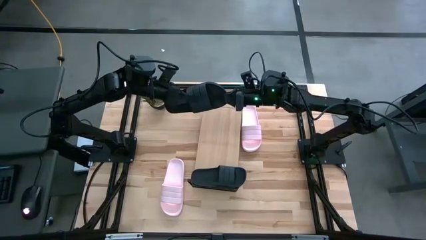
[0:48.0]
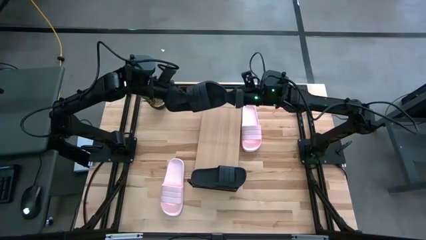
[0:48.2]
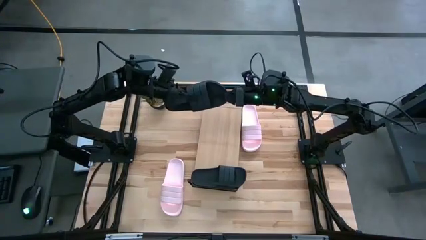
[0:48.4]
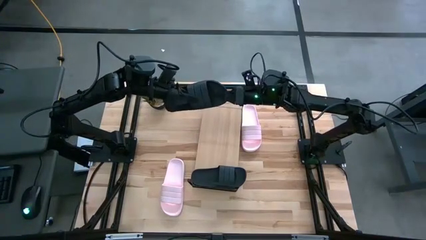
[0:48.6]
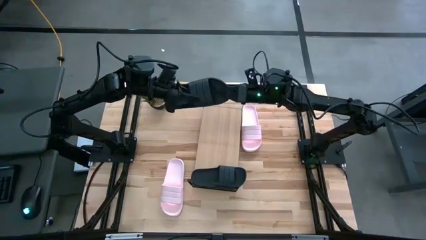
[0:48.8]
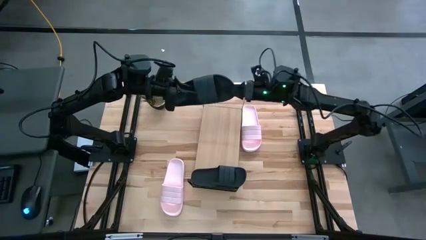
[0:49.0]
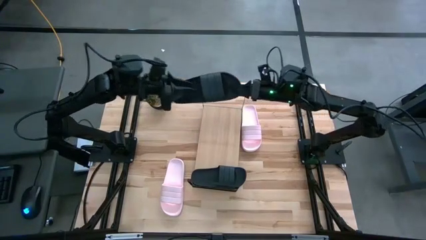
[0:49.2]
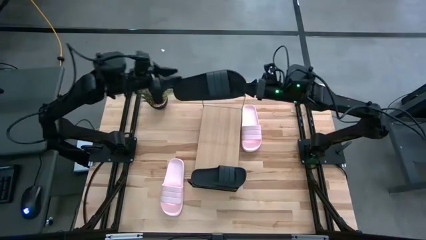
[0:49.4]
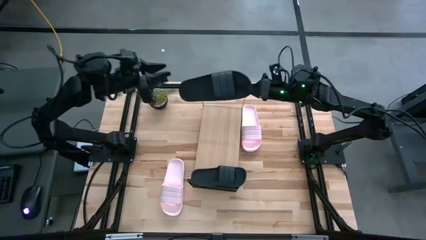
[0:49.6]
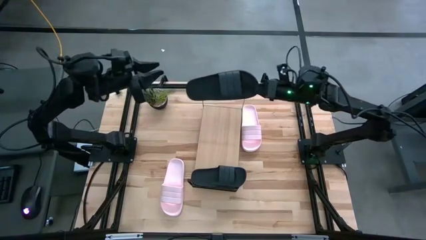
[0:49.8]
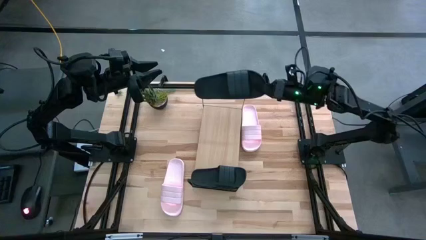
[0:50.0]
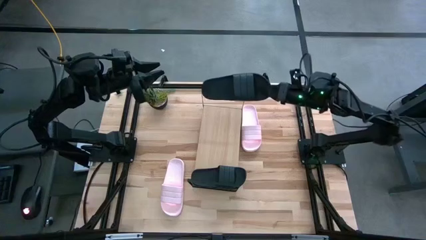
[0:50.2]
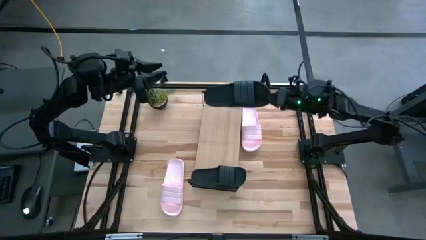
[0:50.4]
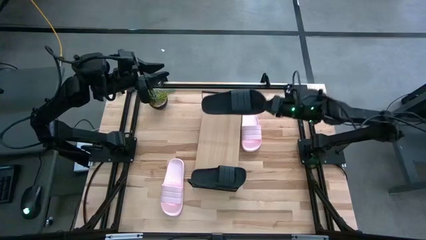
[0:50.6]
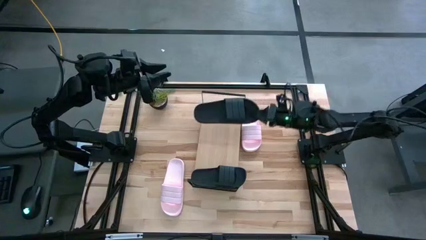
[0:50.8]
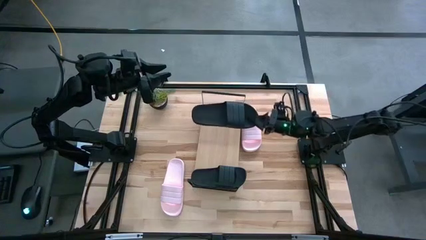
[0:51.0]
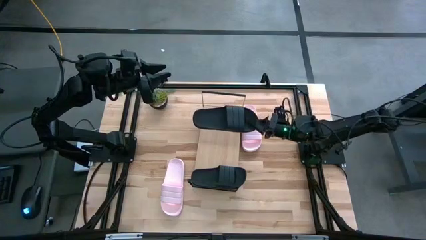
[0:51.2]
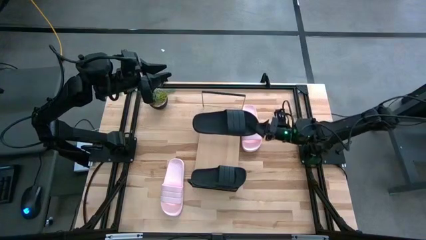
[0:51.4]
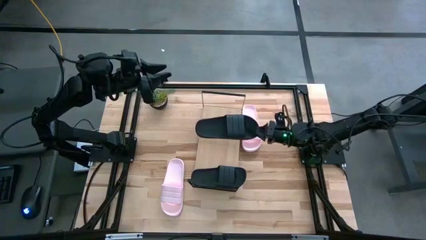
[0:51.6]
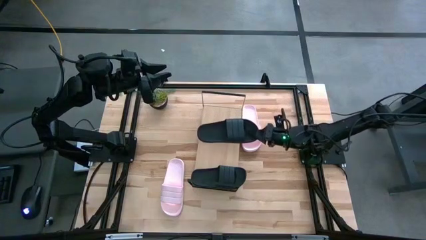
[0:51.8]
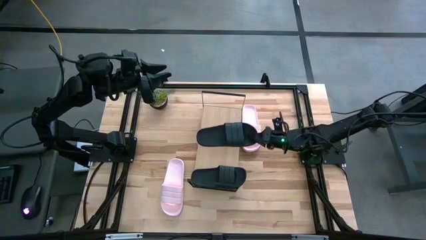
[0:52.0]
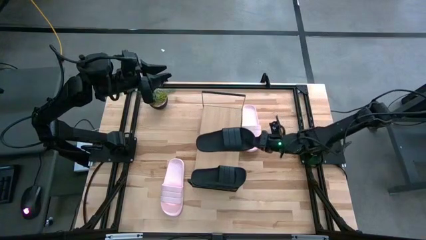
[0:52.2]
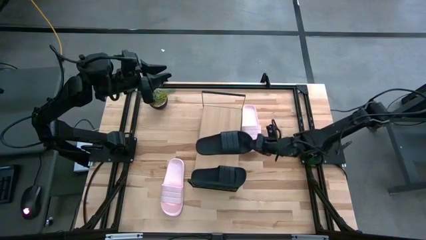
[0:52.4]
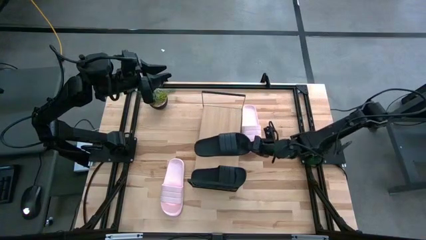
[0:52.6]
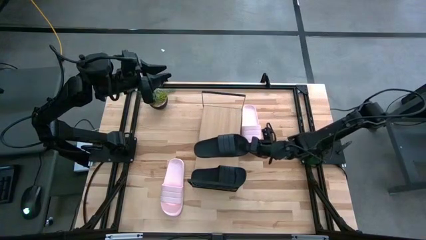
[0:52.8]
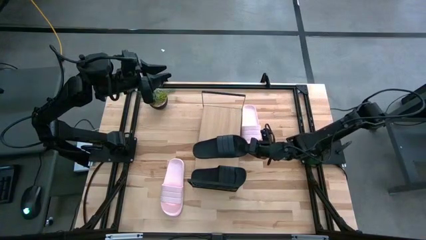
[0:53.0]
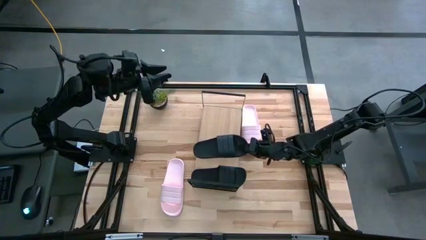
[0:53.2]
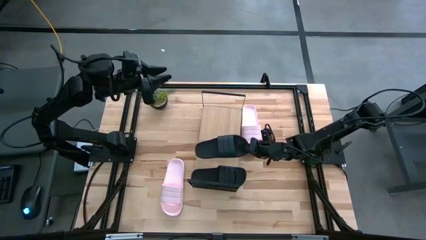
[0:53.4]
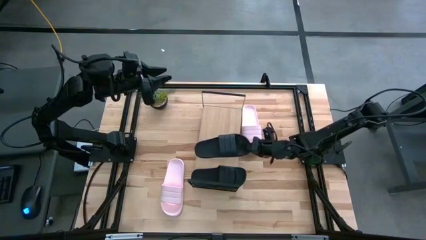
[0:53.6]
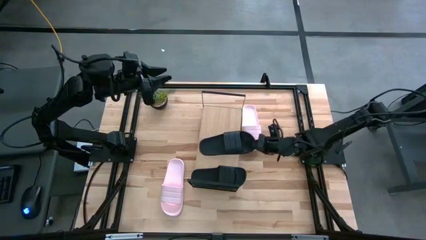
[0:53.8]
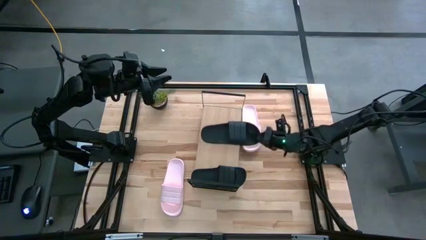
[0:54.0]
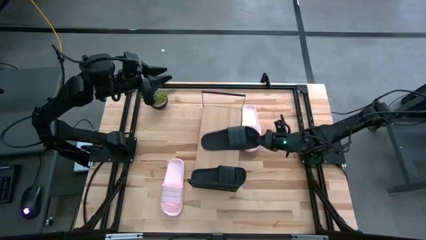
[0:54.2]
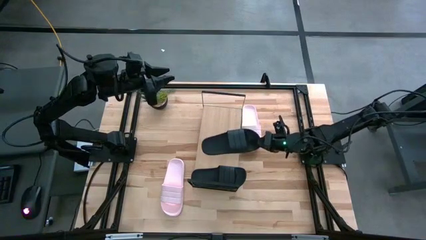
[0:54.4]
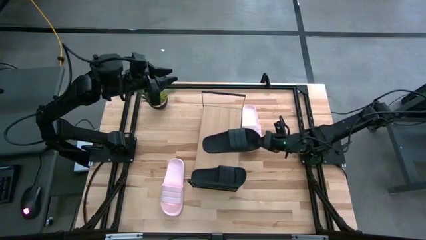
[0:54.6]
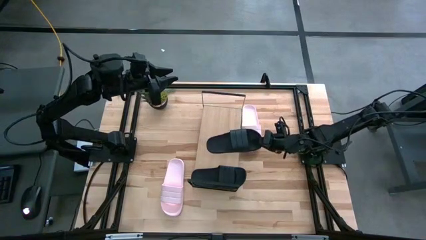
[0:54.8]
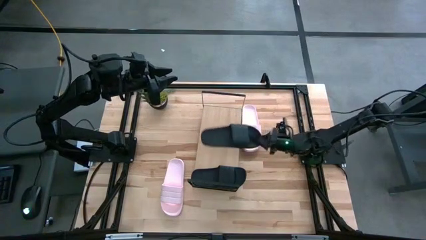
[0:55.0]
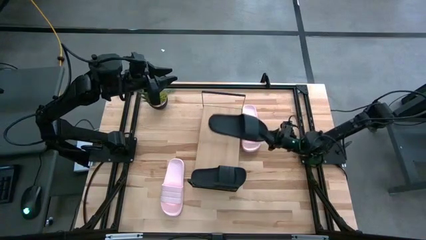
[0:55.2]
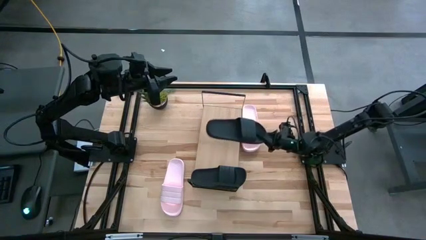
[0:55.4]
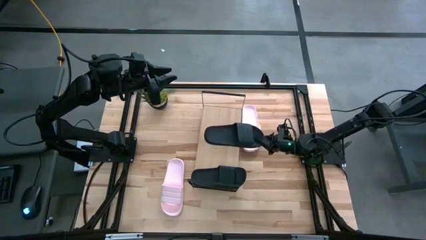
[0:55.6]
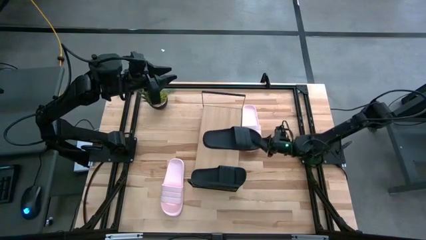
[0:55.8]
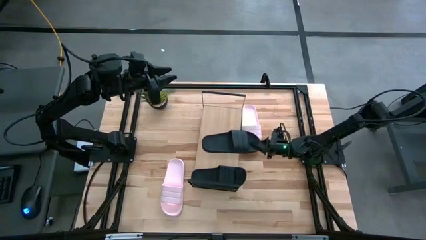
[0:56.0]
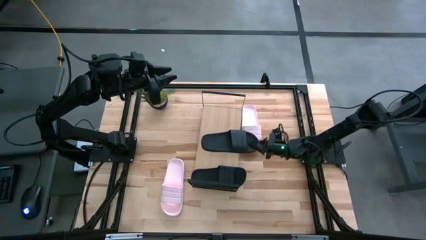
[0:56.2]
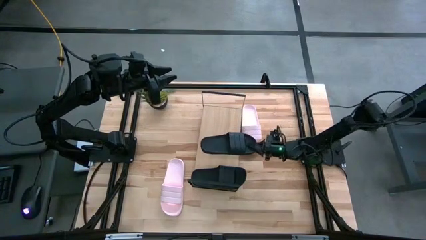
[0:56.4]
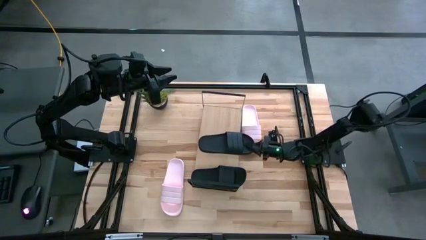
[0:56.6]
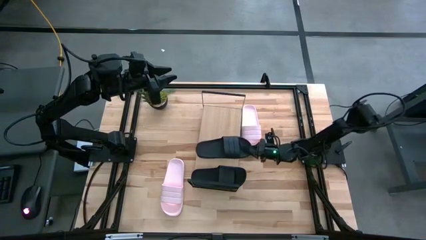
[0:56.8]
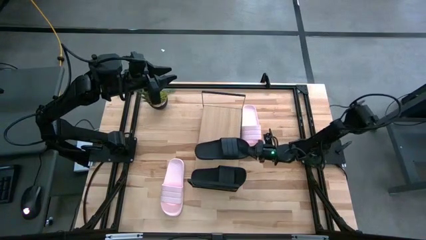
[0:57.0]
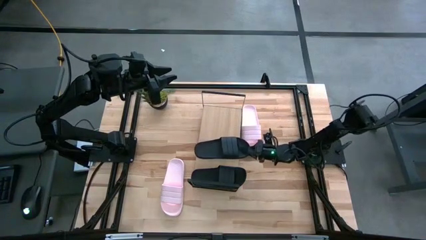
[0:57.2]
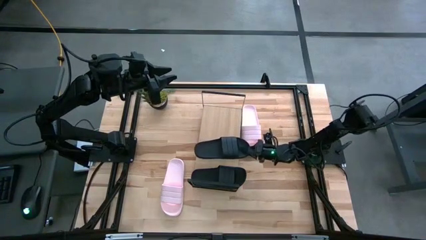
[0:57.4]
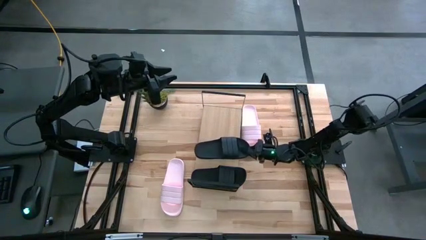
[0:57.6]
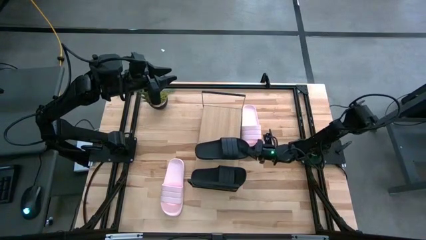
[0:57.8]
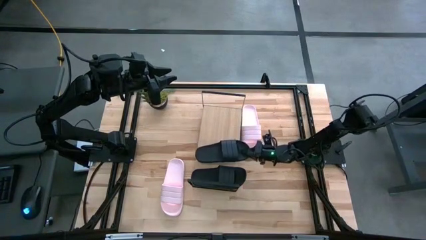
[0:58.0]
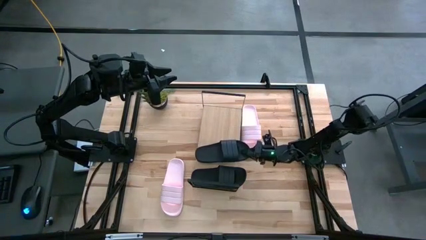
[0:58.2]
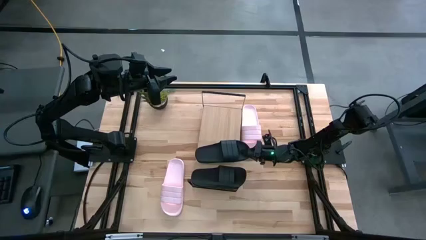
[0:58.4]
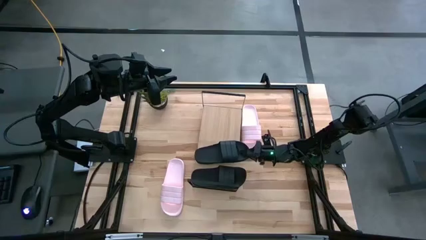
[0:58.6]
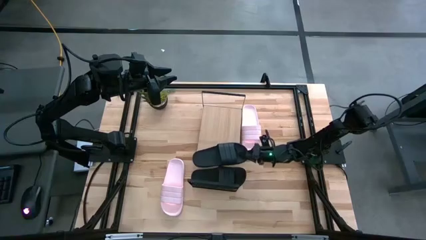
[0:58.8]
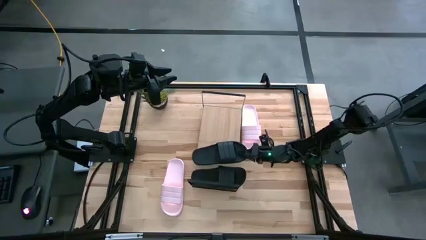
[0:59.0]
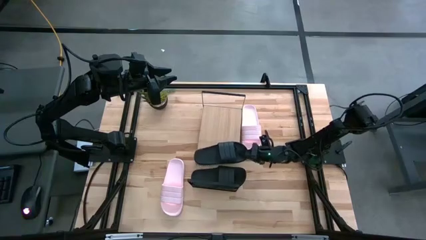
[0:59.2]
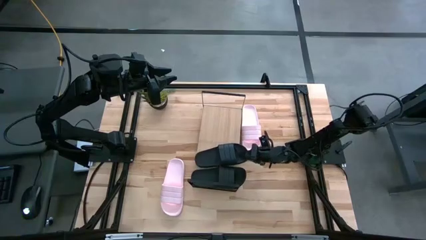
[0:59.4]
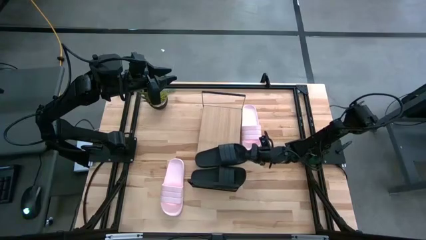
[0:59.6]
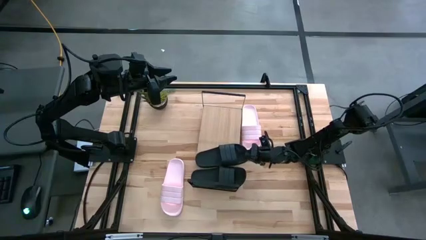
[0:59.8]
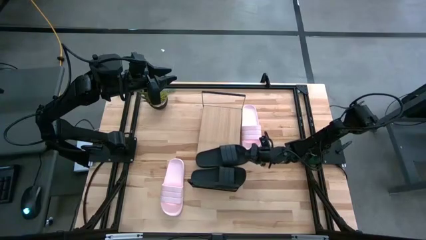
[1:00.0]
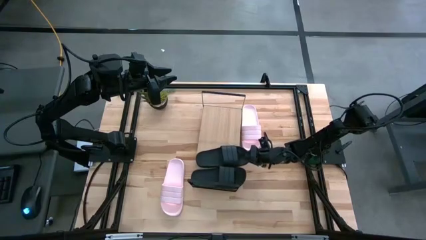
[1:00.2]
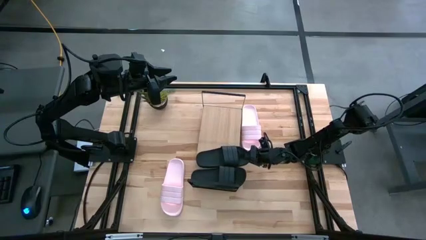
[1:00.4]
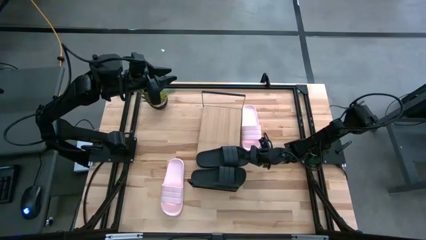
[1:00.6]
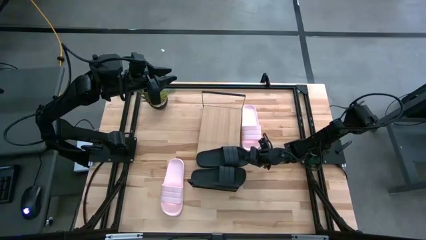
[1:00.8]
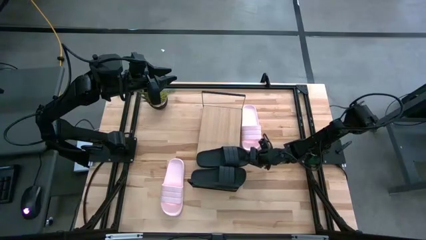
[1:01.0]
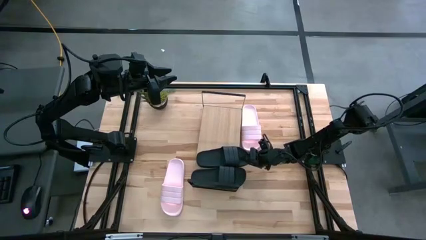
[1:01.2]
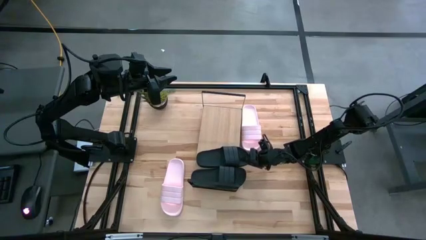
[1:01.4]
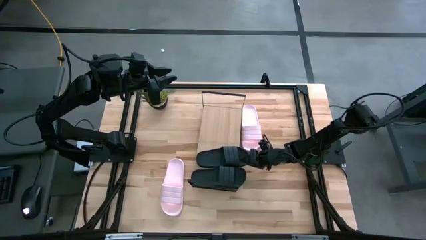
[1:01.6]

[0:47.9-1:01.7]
Task: Pick and place slides into the shelf
Put the black slide on the shelf
